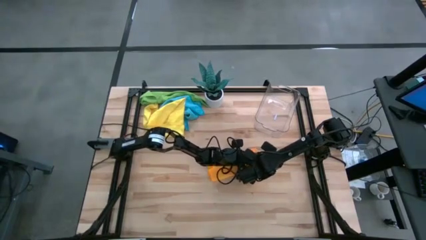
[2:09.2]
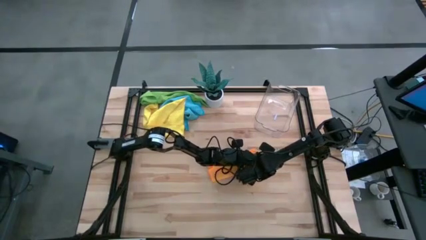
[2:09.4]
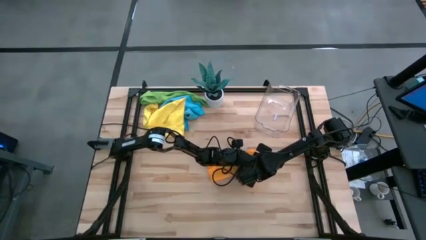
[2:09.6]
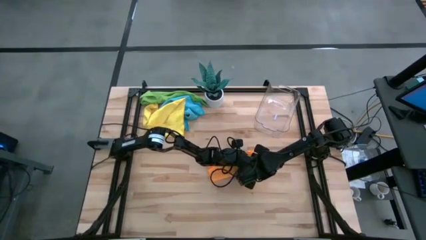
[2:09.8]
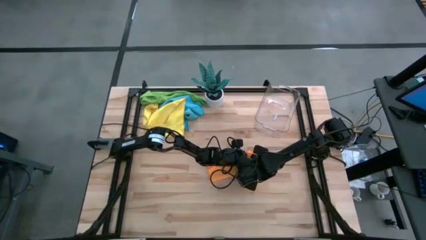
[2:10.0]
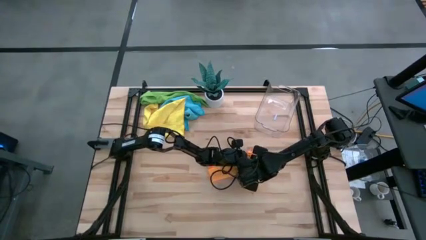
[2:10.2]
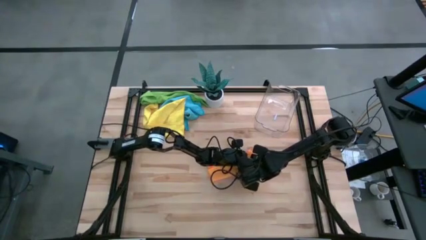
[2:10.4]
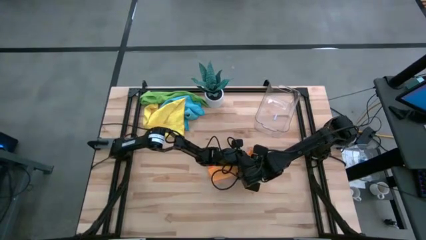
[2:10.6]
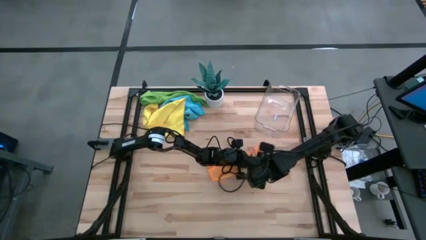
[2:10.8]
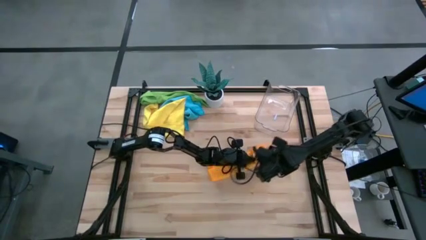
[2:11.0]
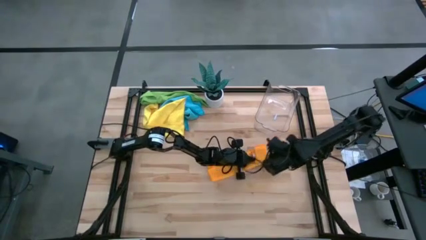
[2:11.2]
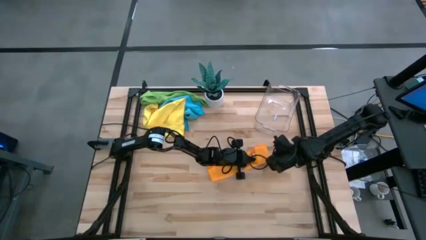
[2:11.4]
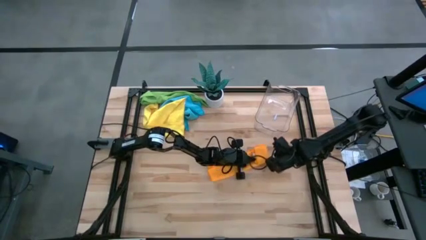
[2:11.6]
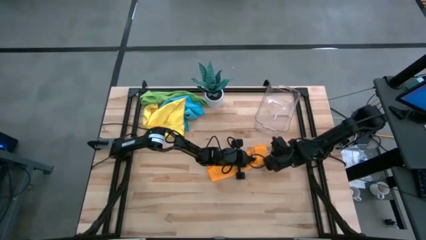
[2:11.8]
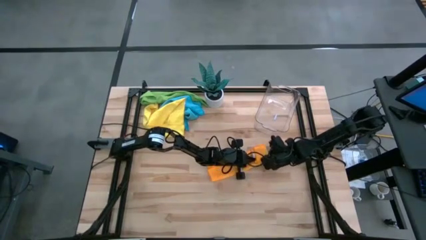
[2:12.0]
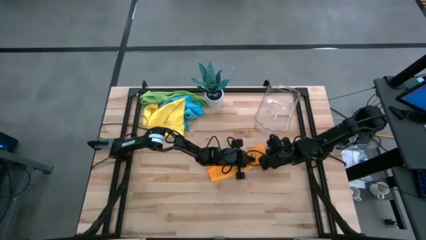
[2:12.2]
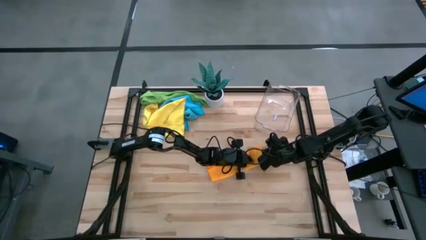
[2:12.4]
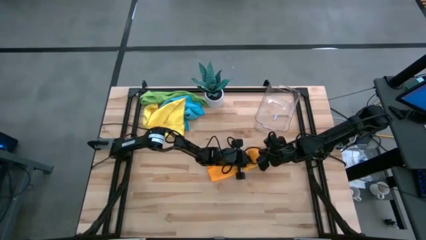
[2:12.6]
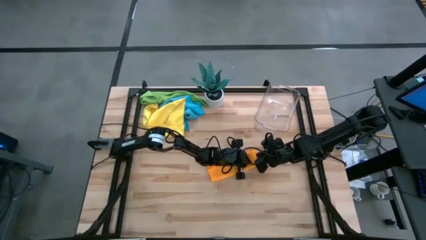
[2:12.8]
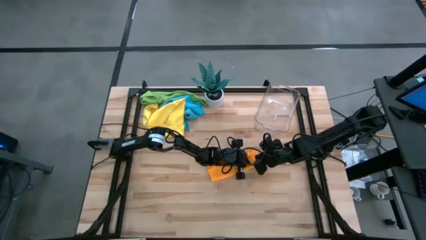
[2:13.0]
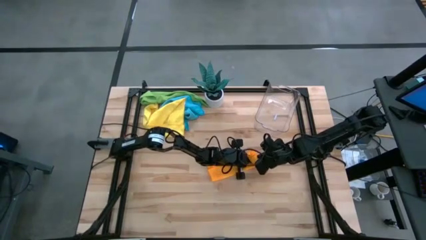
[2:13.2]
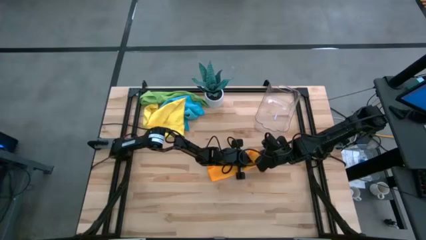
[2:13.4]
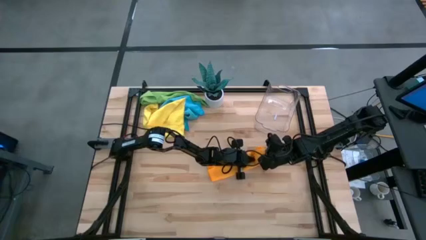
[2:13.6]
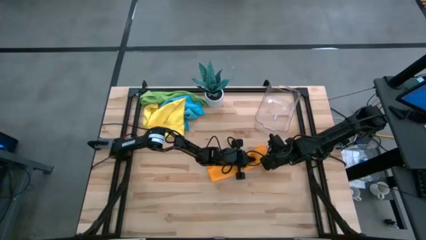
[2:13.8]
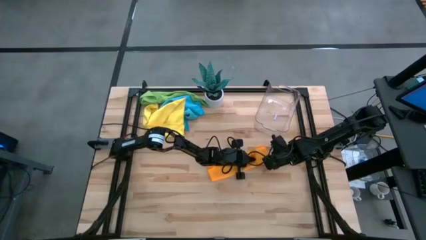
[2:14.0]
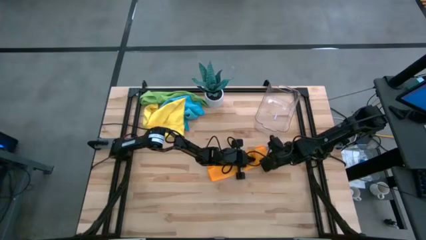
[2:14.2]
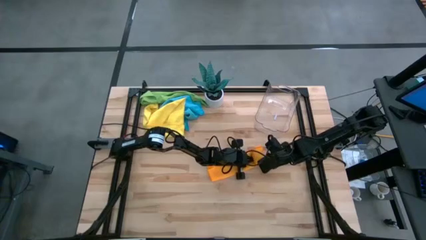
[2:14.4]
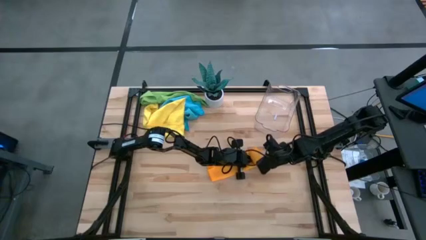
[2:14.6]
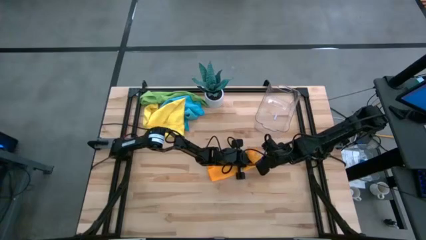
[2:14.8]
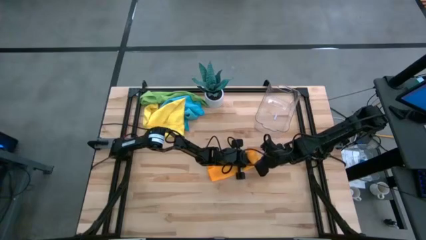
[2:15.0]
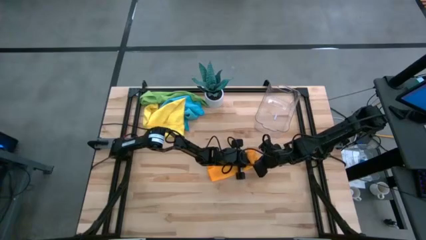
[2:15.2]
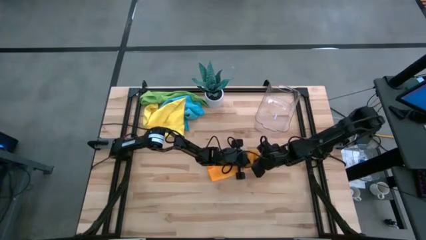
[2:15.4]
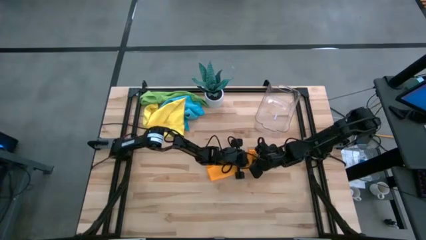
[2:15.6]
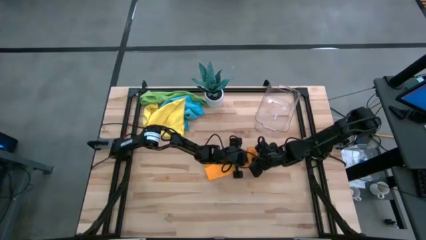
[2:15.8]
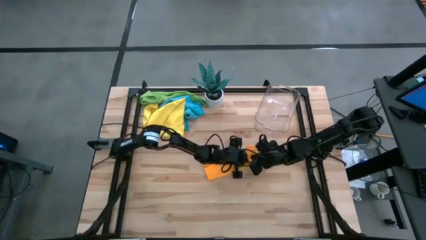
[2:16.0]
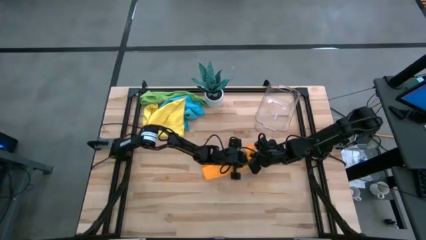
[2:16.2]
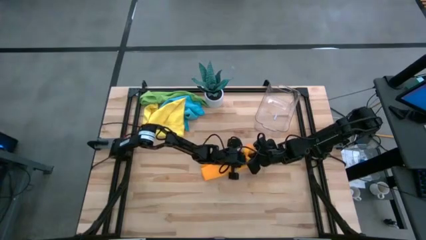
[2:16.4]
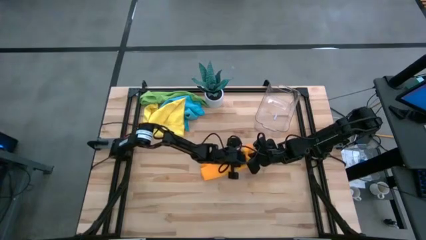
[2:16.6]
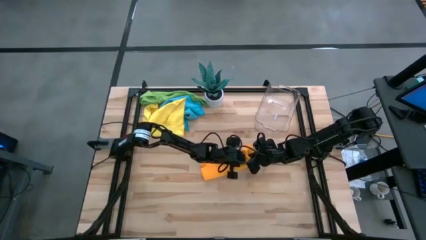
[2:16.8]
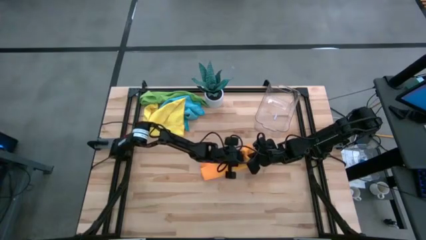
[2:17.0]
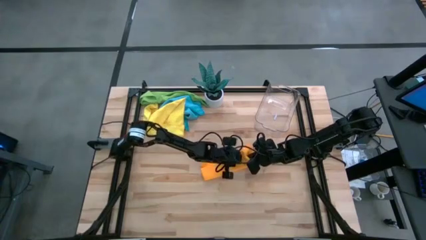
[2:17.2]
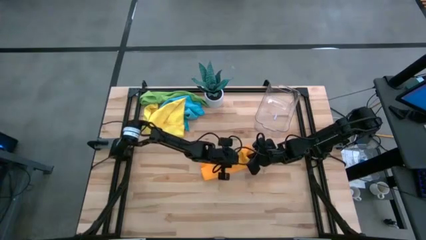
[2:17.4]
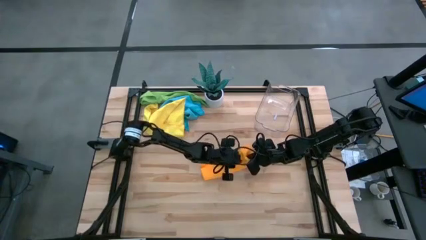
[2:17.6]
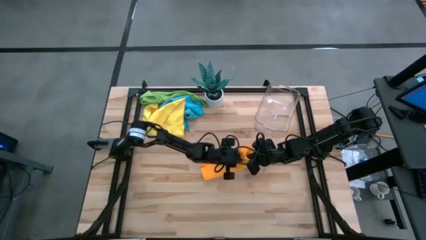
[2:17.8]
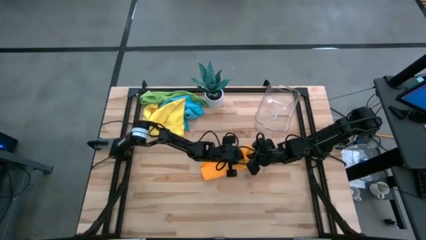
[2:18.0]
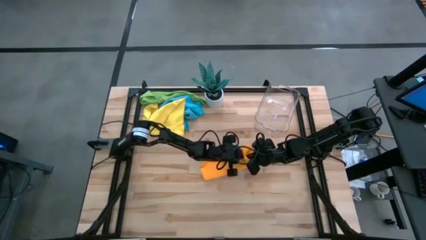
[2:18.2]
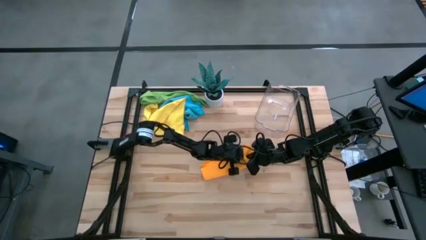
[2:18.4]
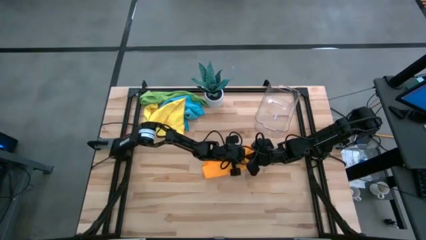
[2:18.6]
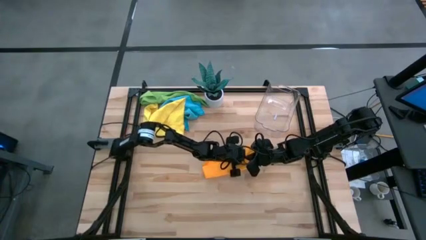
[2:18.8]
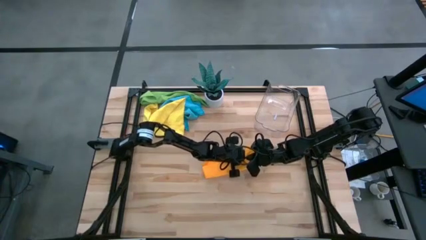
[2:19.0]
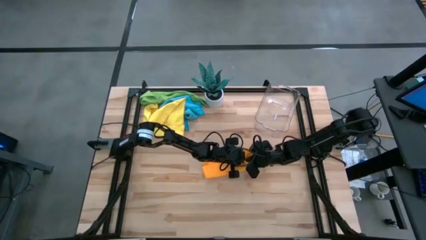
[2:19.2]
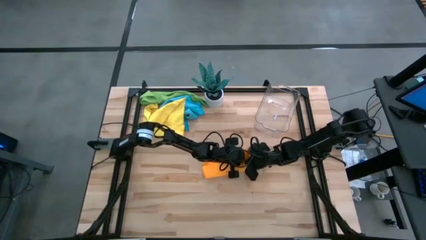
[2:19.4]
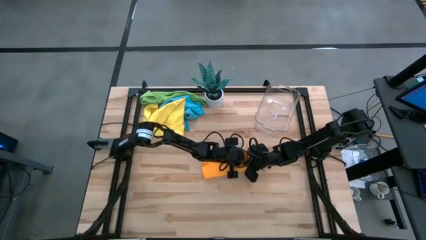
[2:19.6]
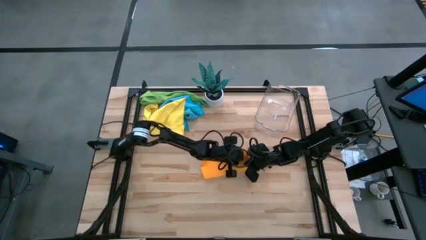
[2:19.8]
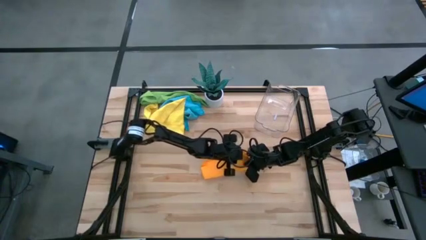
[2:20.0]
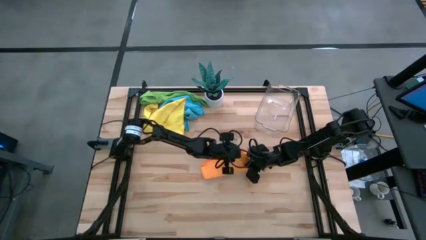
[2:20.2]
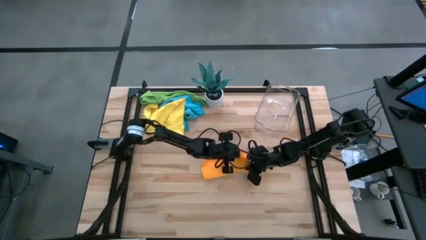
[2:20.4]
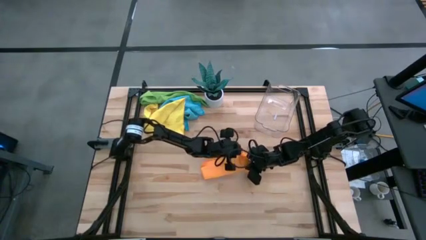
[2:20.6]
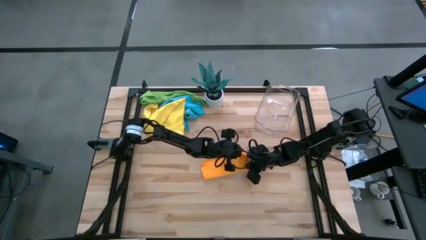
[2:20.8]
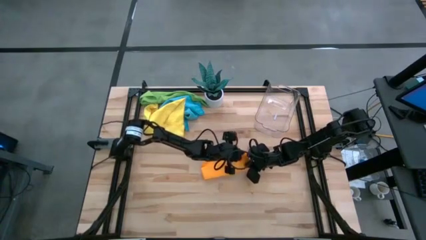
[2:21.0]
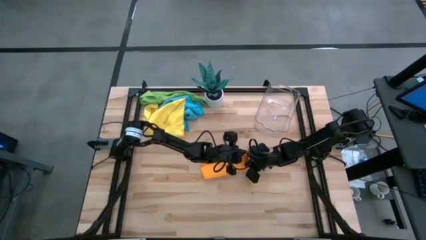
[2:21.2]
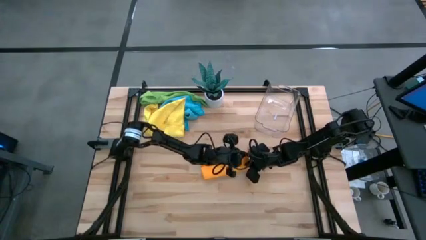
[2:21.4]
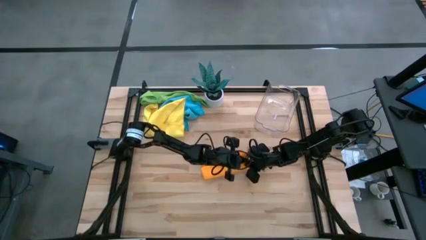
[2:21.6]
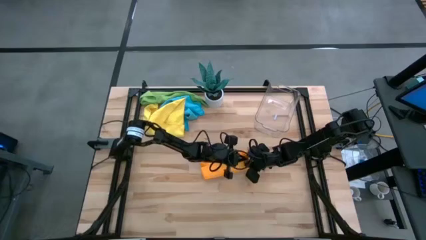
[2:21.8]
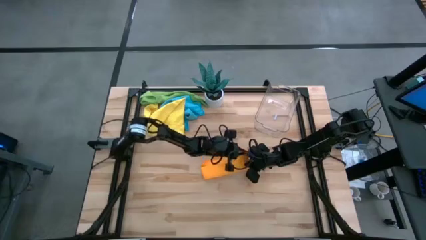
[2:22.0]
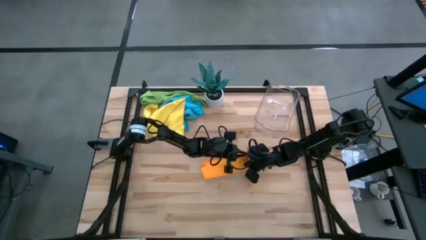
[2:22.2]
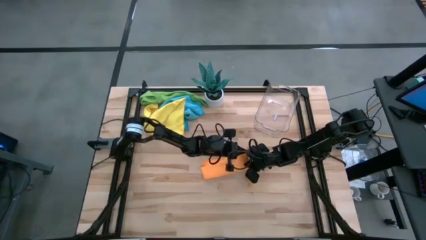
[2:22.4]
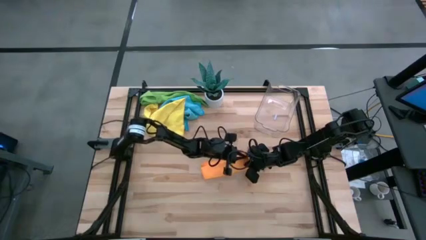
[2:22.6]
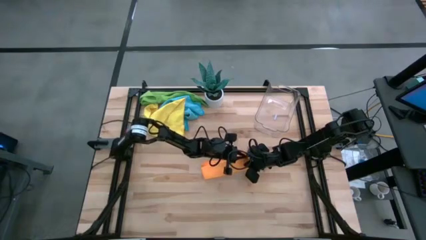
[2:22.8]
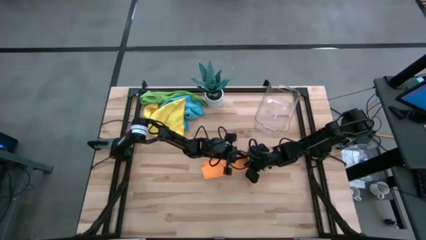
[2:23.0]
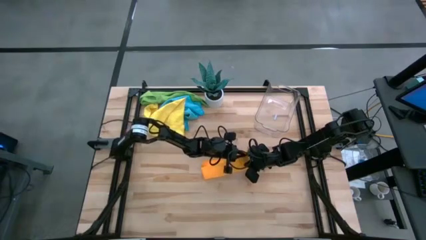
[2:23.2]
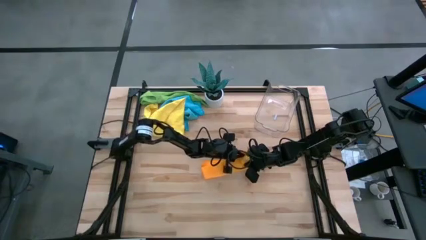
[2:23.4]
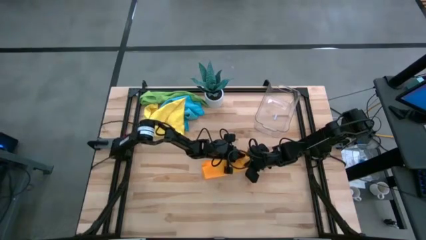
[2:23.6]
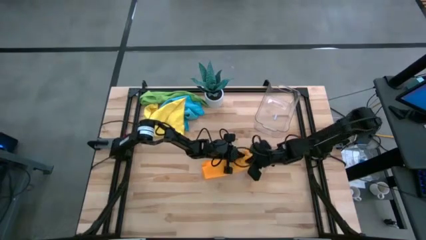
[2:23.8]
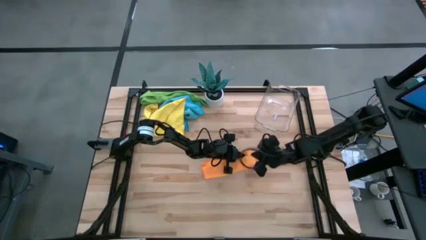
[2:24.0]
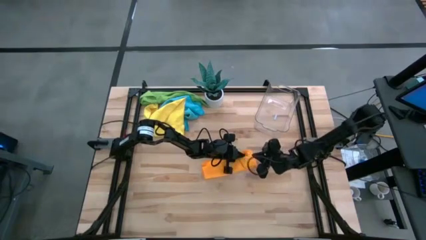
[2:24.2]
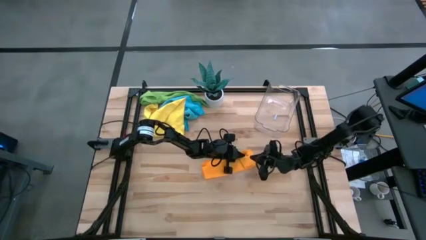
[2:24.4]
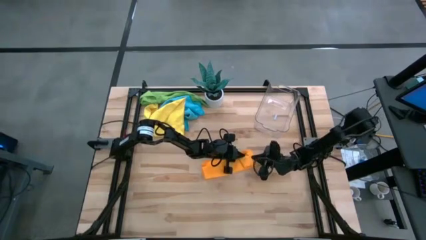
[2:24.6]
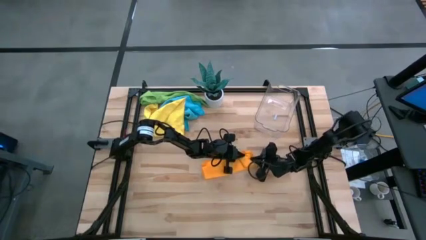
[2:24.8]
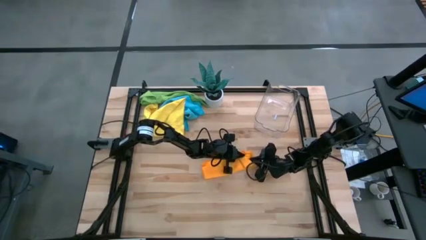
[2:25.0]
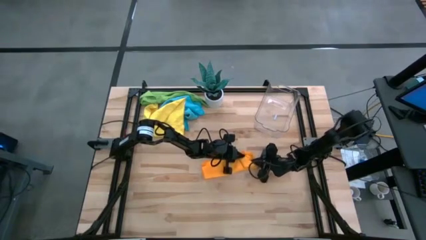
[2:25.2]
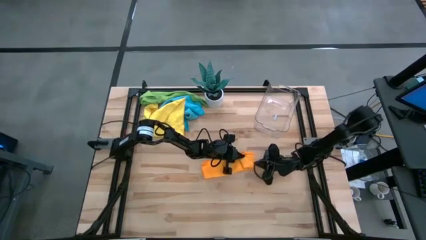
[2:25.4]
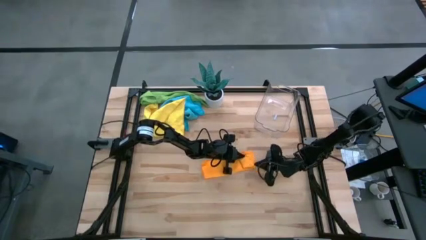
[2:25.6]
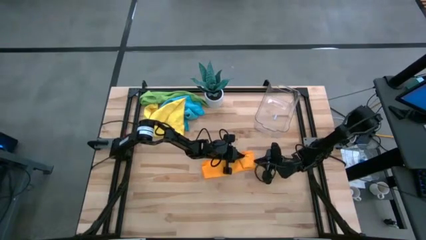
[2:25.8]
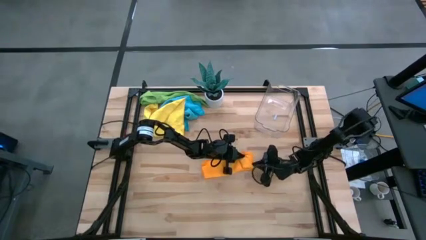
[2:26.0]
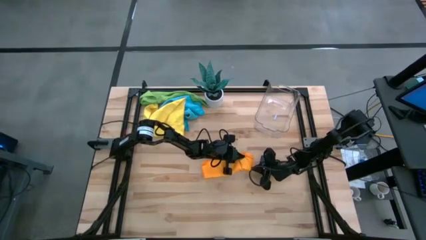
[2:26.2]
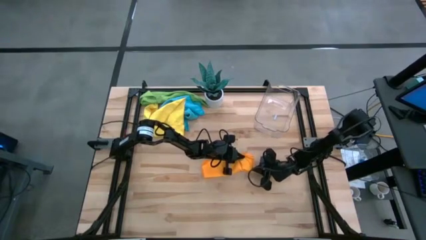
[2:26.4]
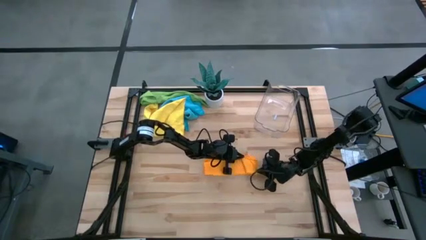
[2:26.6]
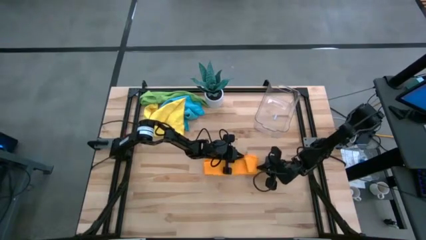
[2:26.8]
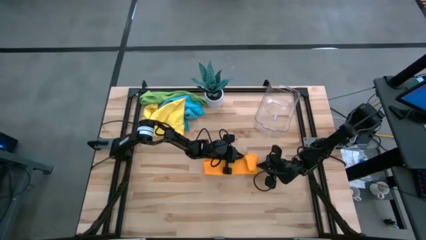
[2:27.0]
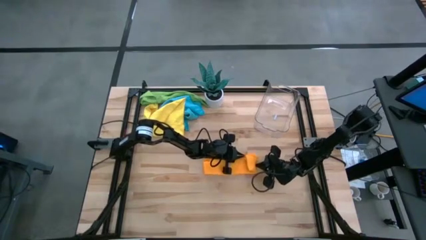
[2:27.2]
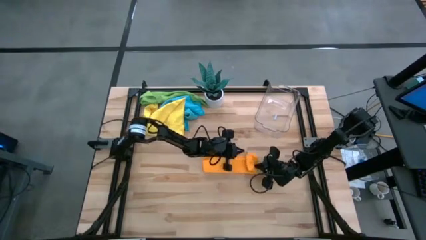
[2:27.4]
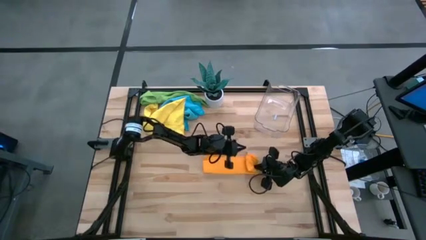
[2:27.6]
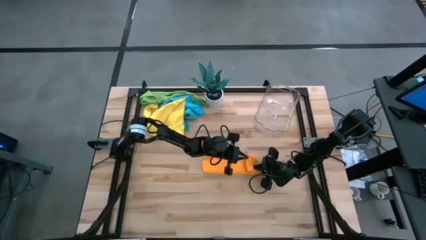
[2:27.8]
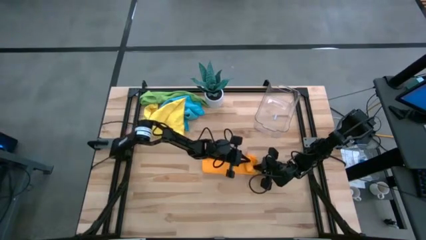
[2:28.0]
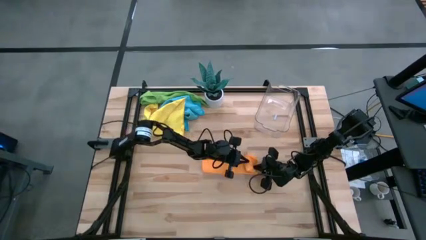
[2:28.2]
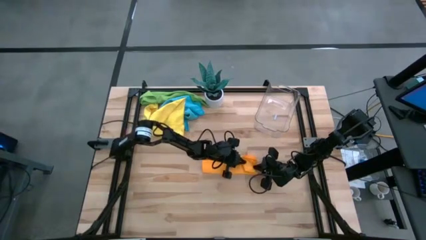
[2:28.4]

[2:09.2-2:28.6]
Task: Roll microfiber towels into tight, uniform cylinder then place into a basket
Roll the orange microfiber cloth
